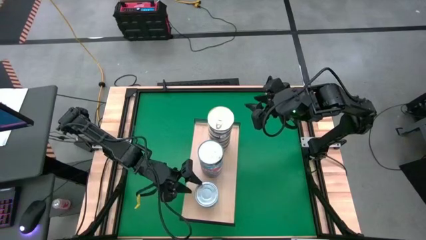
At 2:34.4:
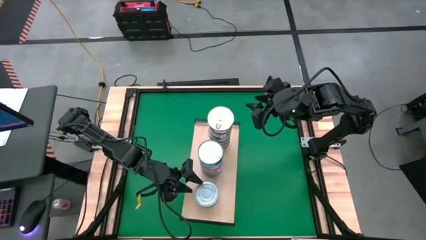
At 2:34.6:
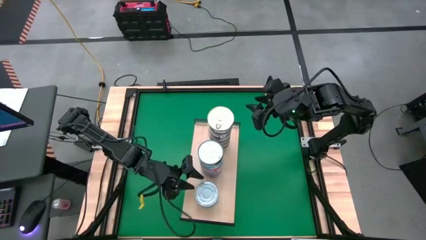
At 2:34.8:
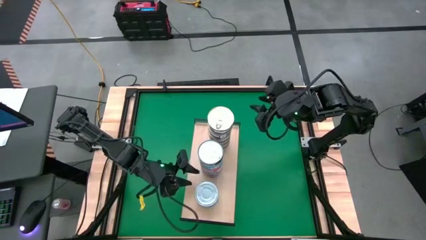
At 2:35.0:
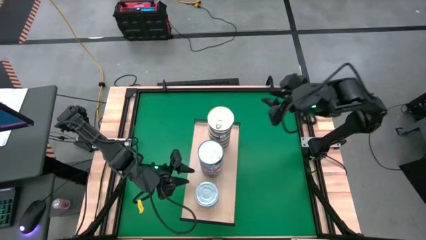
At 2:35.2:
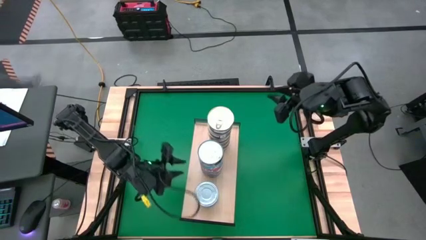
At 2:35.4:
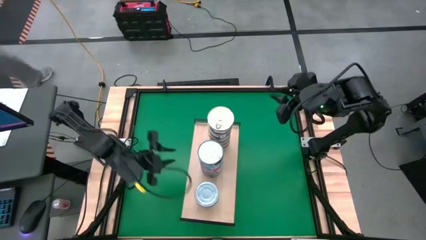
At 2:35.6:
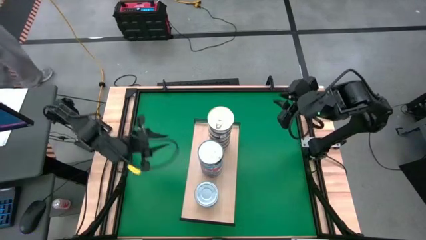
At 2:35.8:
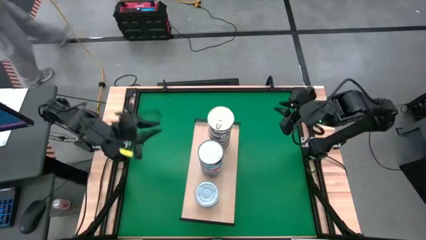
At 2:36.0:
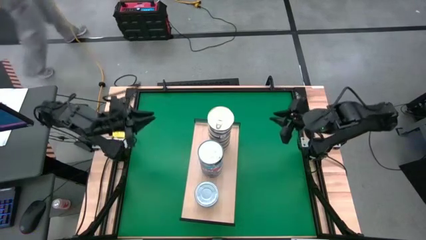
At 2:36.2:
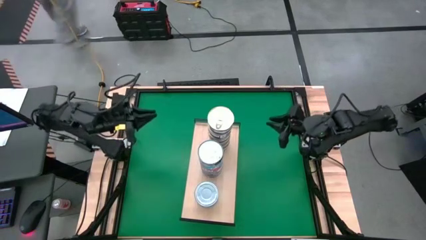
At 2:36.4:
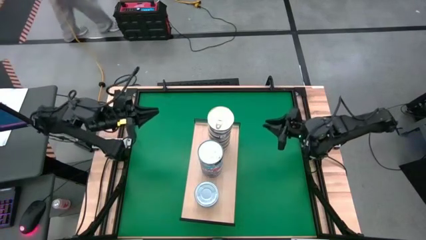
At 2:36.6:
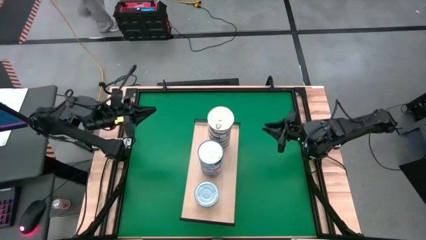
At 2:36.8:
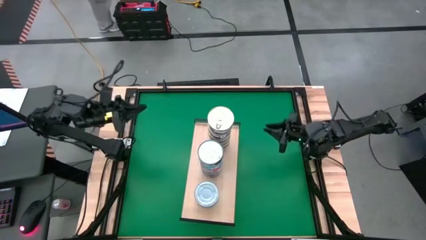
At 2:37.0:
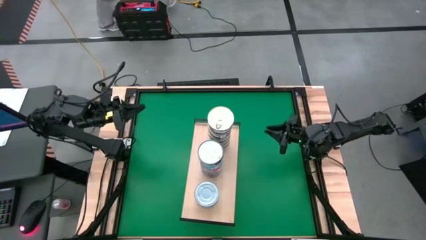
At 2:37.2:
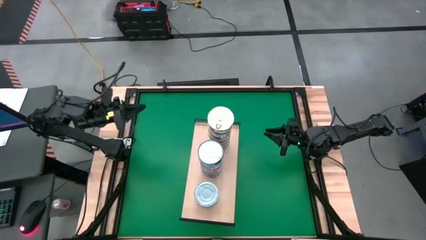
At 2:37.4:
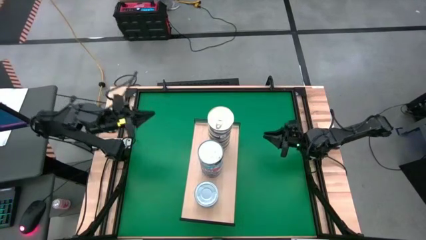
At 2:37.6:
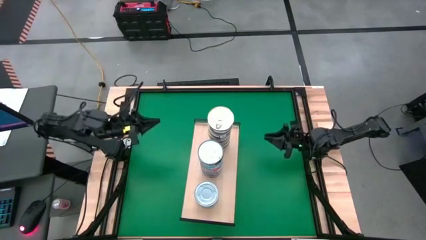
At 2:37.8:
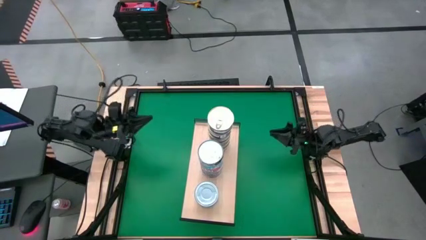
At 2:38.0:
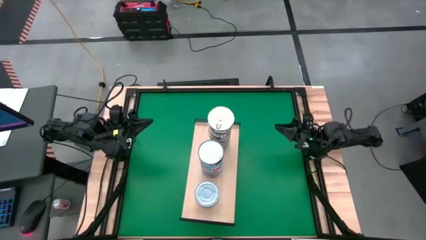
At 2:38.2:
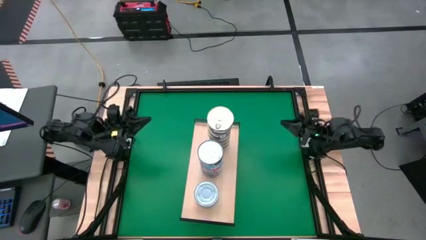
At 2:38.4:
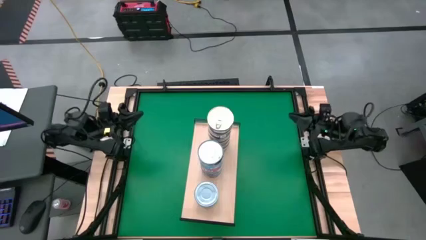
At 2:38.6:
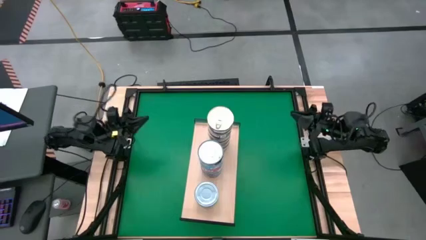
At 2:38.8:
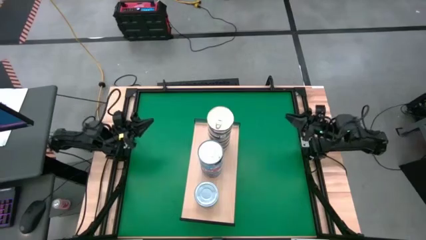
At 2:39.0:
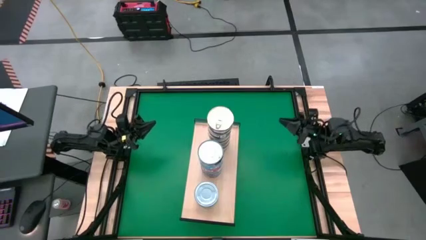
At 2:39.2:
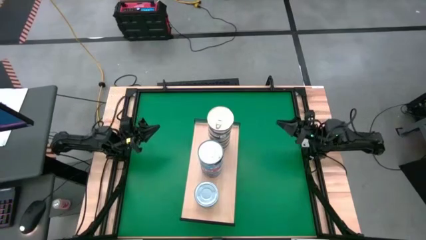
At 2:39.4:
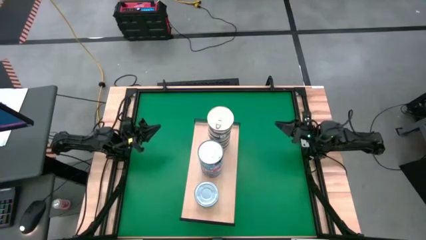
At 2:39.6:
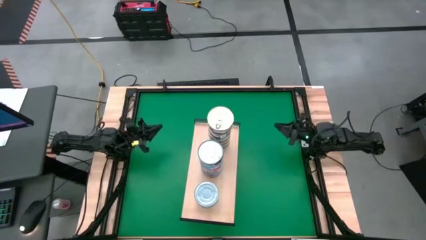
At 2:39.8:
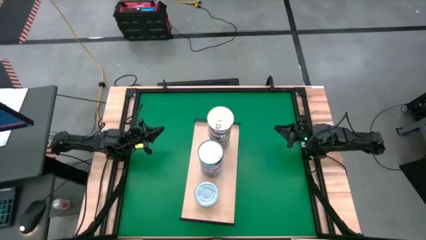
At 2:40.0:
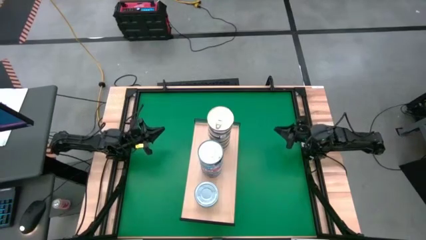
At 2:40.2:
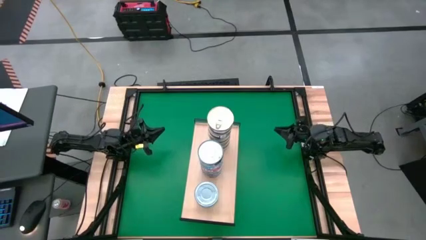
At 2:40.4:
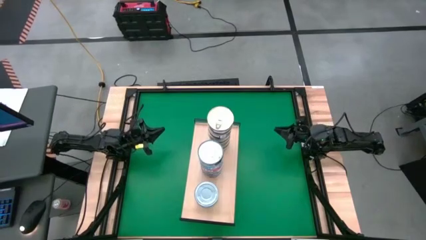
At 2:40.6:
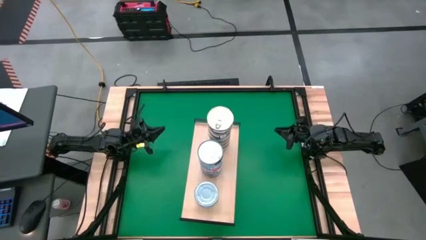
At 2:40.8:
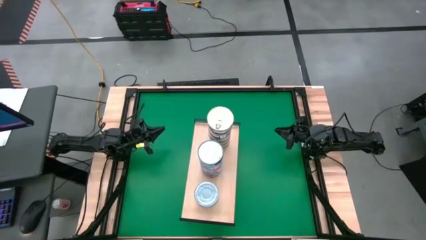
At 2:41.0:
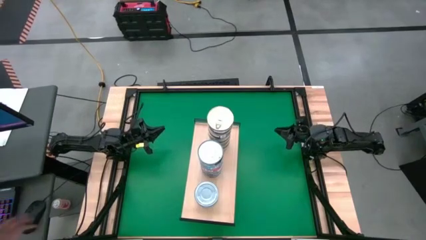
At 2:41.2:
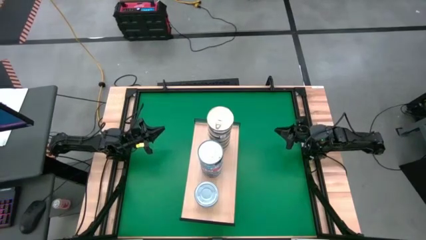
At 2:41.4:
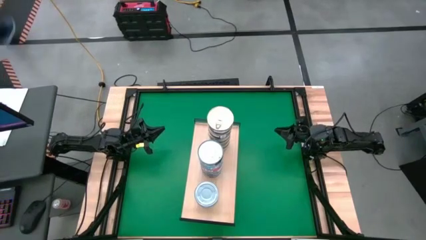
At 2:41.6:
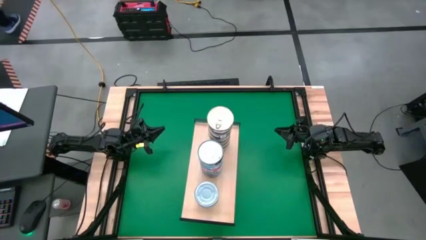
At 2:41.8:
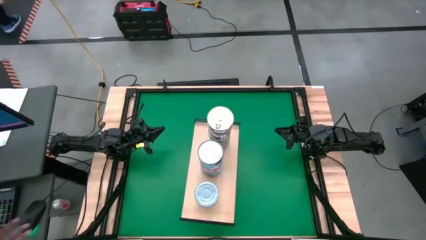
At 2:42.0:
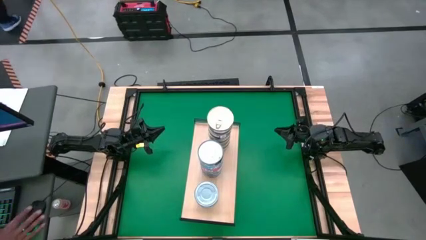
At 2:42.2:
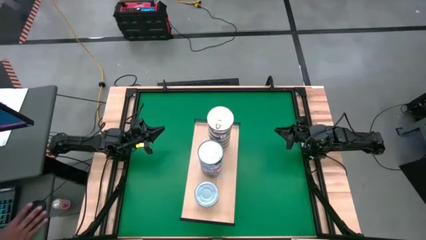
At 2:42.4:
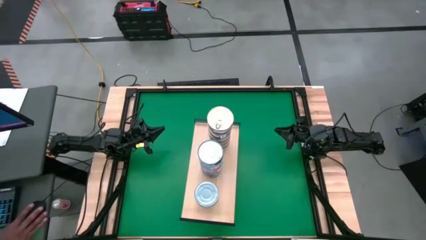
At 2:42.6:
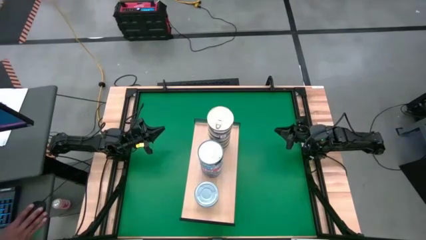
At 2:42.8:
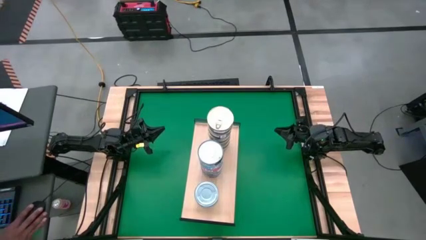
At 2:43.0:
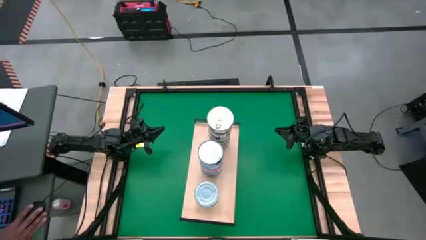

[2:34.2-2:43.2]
Task: Stack canned seafood by type on shelf
Return to Home Position
